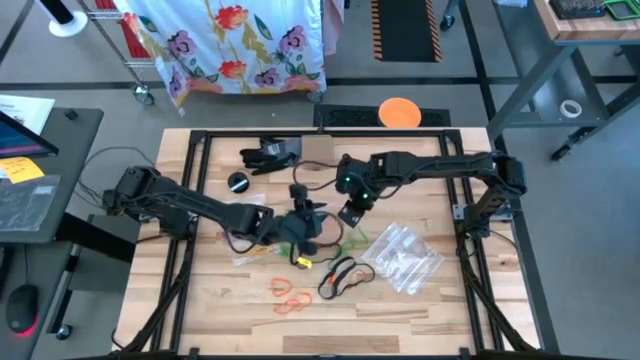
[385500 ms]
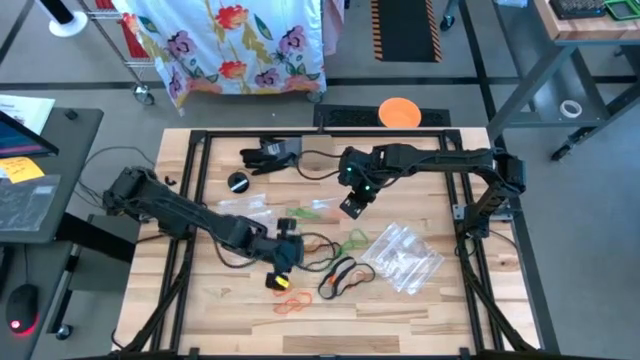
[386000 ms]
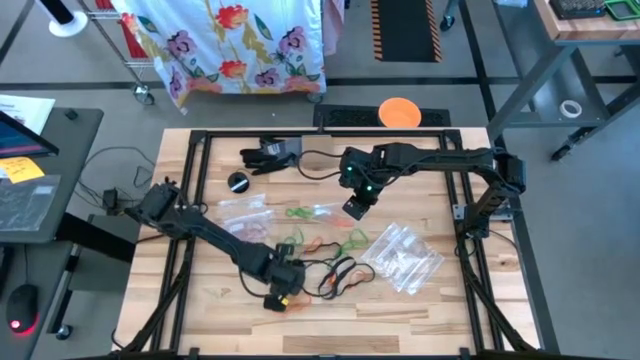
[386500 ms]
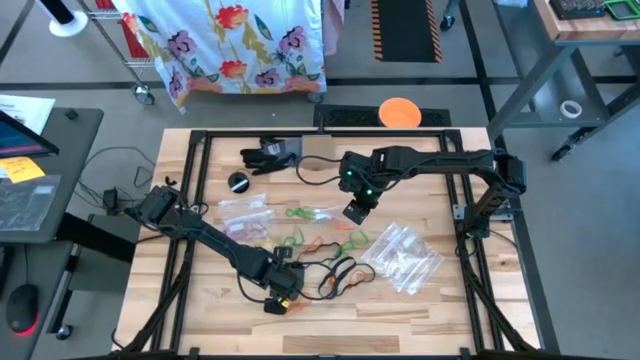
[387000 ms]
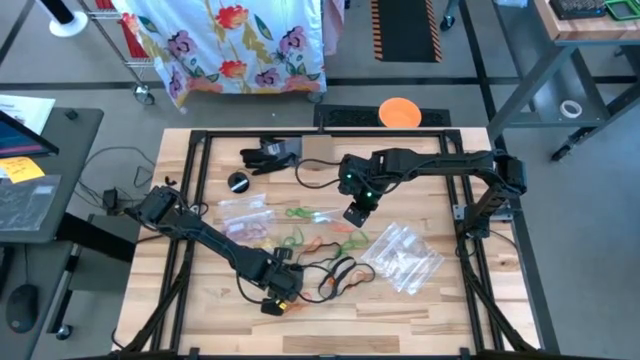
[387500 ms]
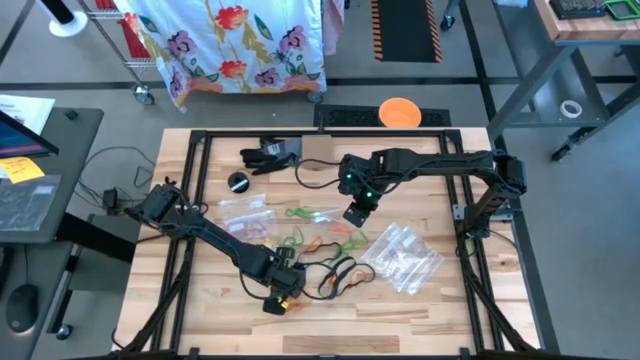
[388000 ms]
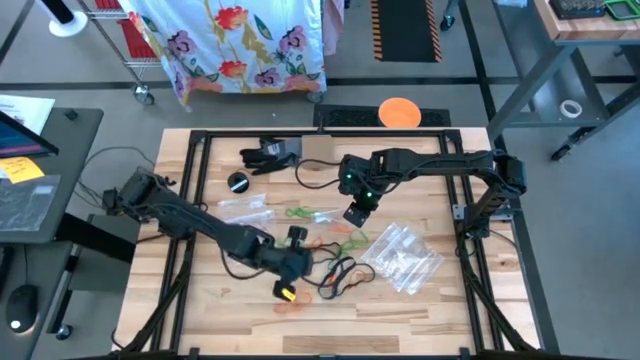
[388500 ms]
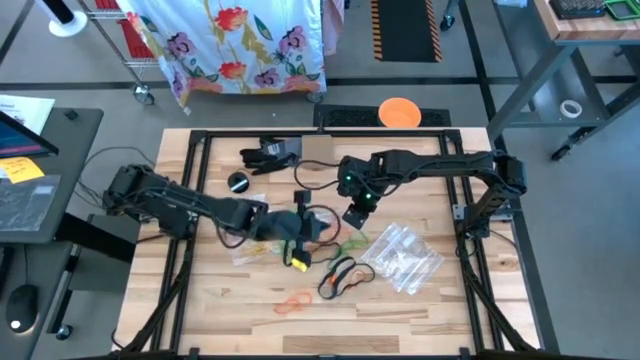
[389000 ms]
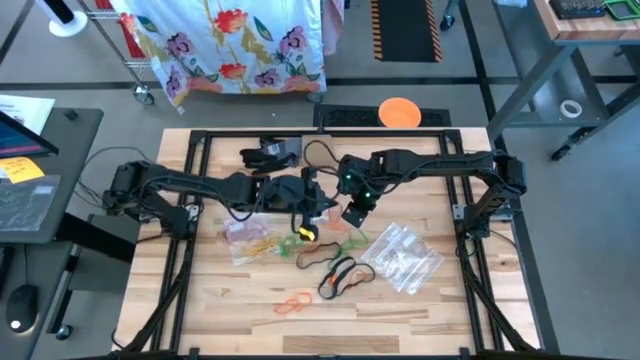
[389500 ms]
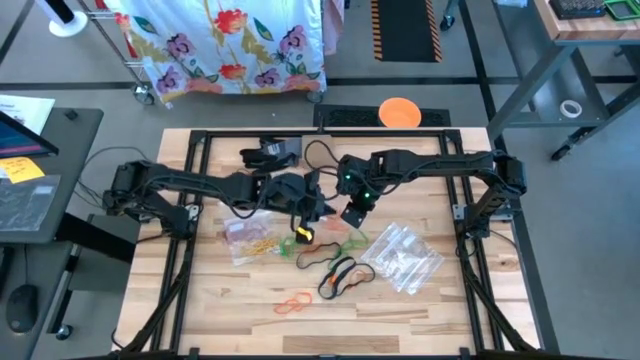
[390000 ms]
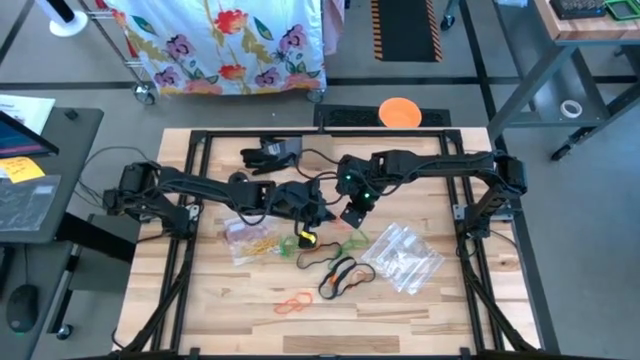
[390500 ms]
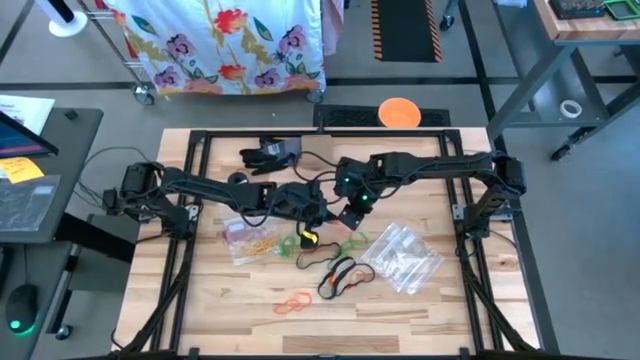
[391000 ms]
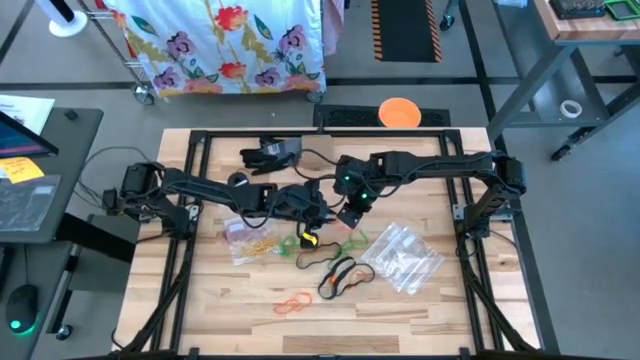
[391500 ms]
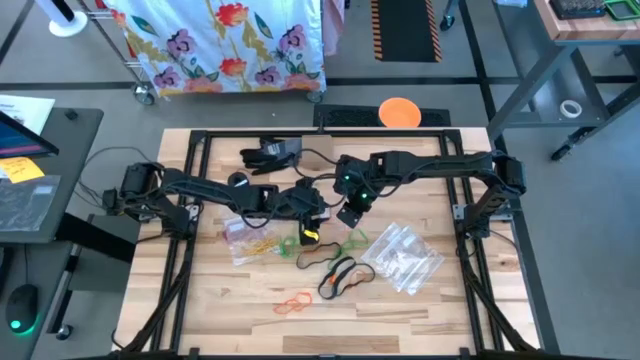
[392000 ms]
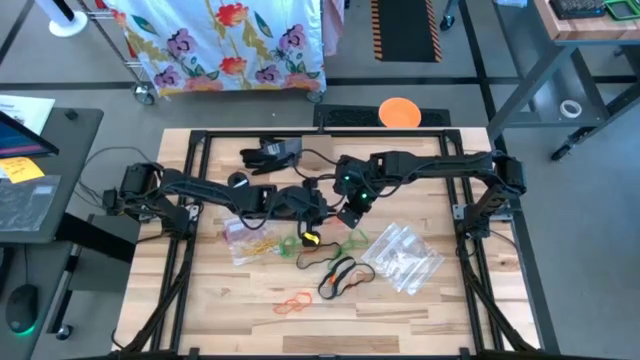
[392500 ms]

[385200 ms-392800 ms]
Task: Sort rubber bands
Put the orange rubber band into the transparent zip bag

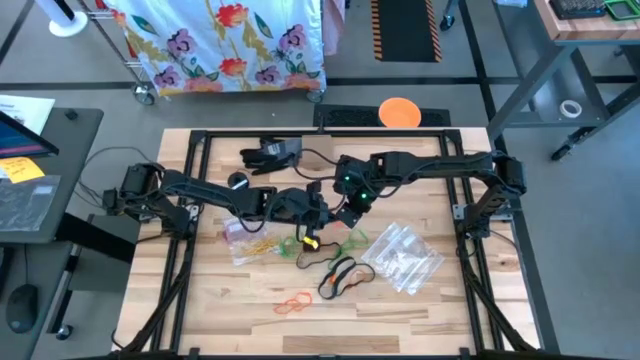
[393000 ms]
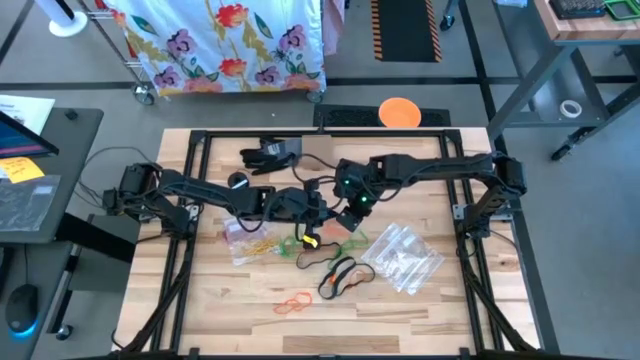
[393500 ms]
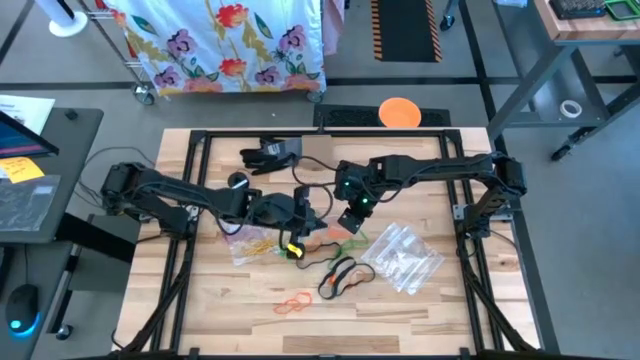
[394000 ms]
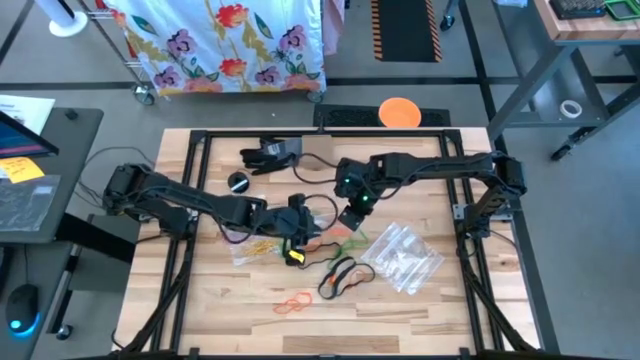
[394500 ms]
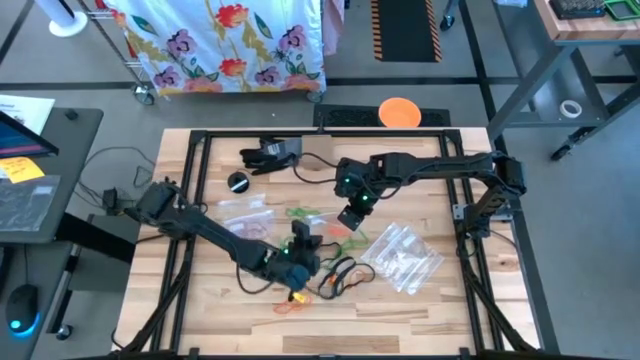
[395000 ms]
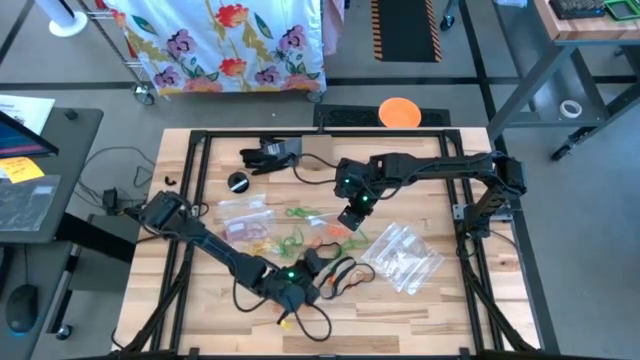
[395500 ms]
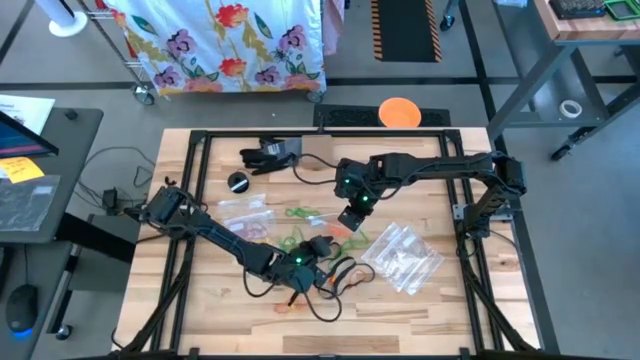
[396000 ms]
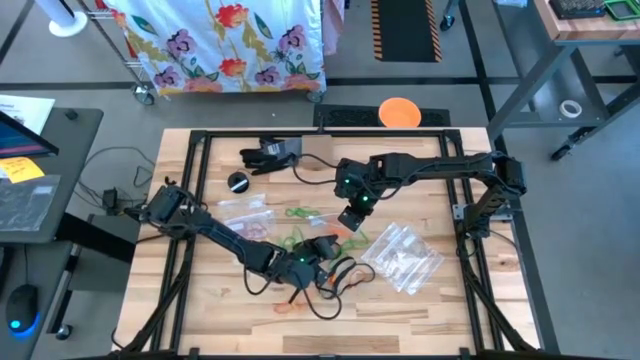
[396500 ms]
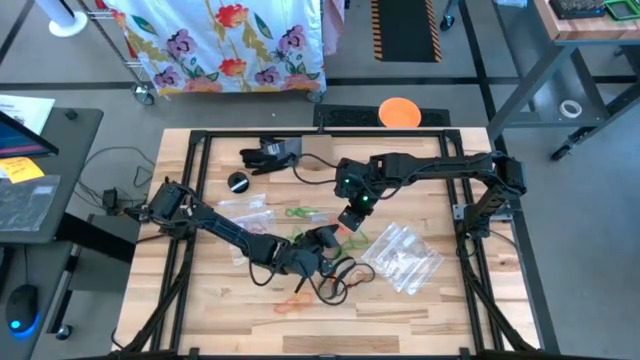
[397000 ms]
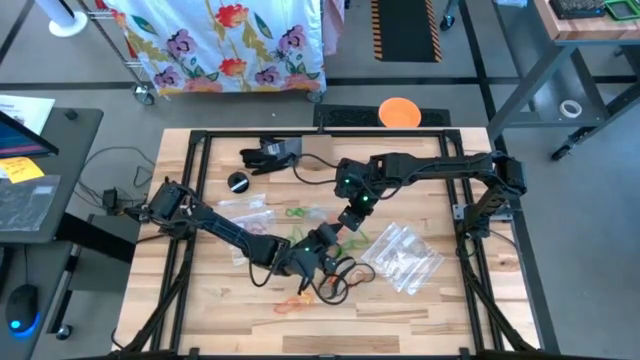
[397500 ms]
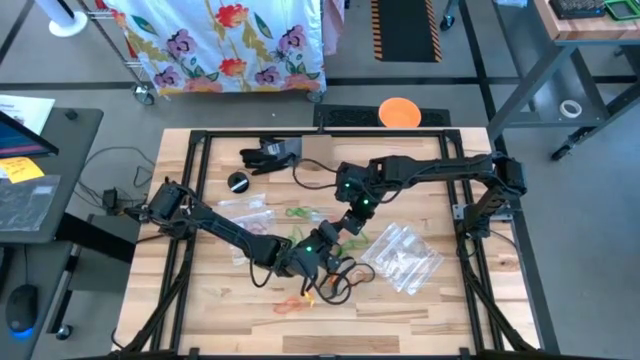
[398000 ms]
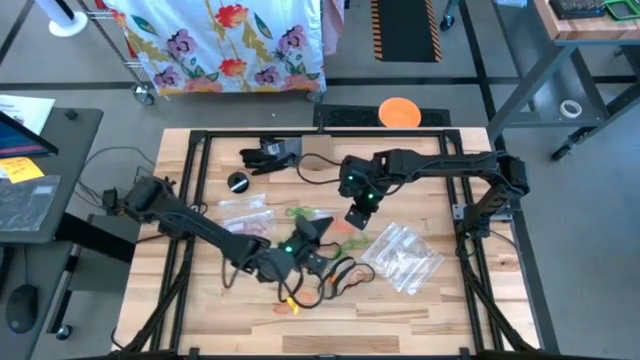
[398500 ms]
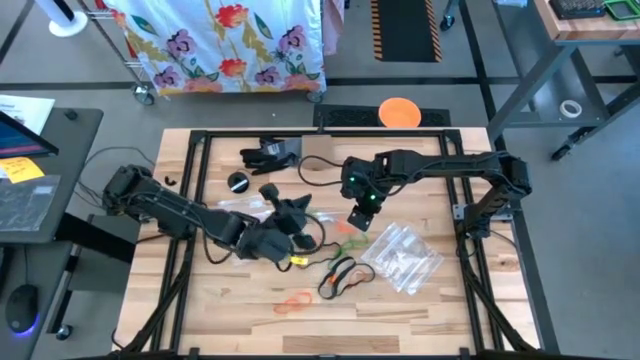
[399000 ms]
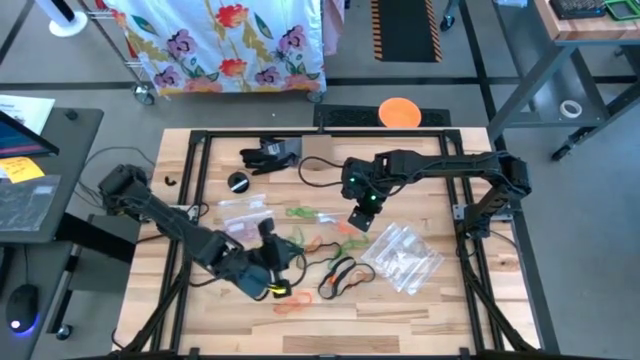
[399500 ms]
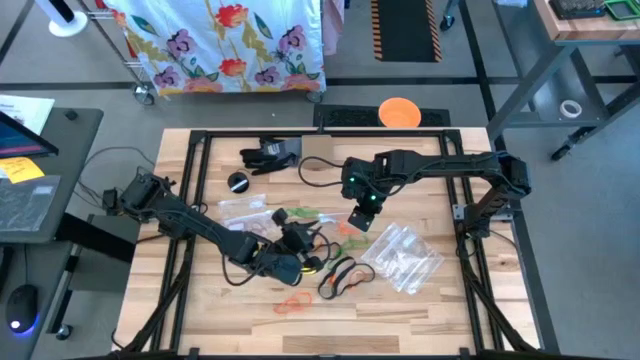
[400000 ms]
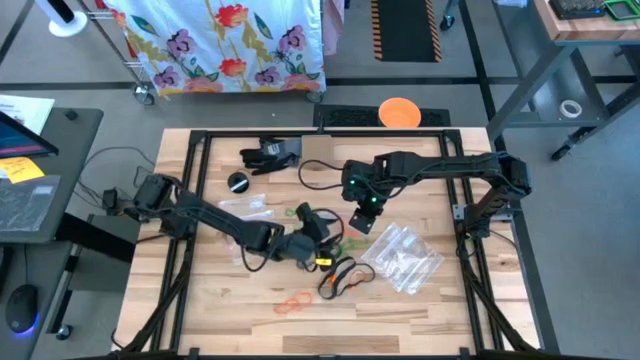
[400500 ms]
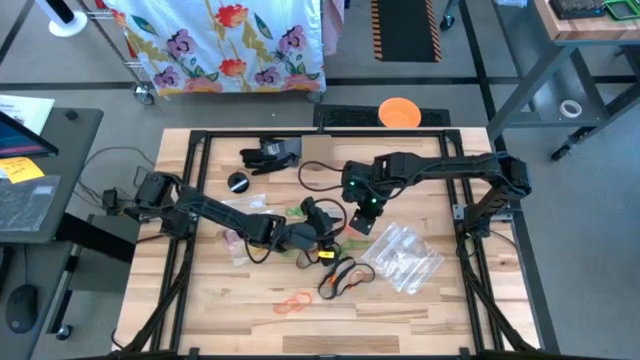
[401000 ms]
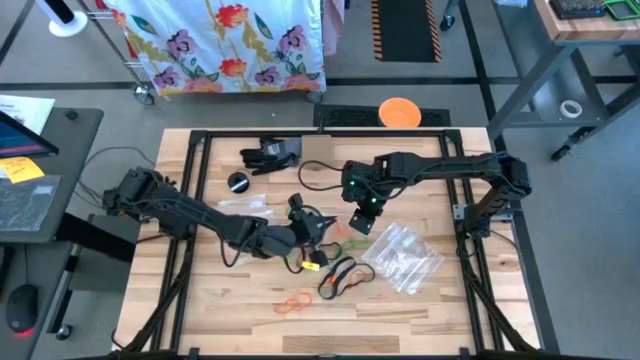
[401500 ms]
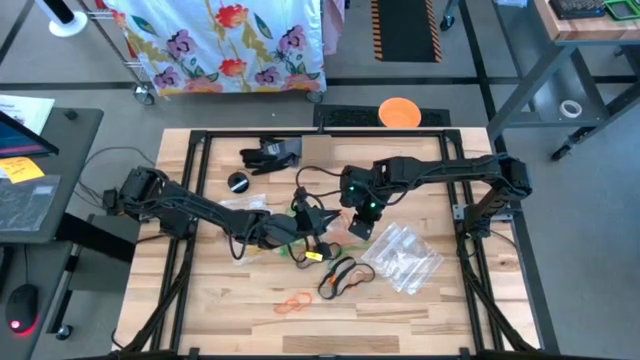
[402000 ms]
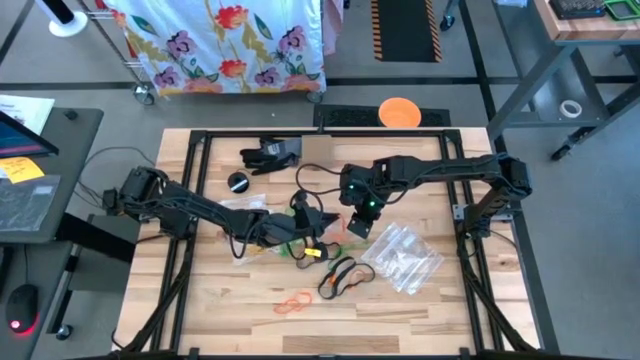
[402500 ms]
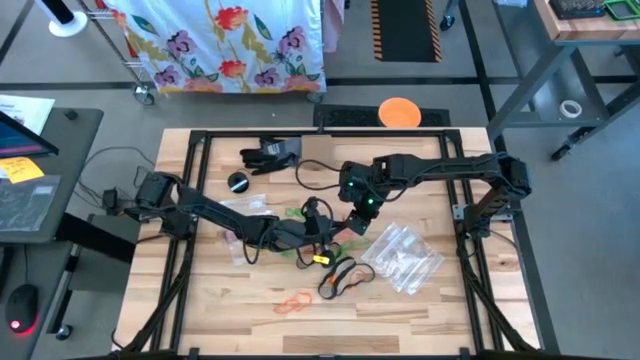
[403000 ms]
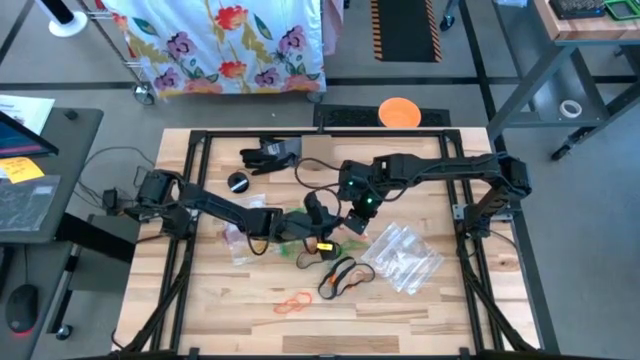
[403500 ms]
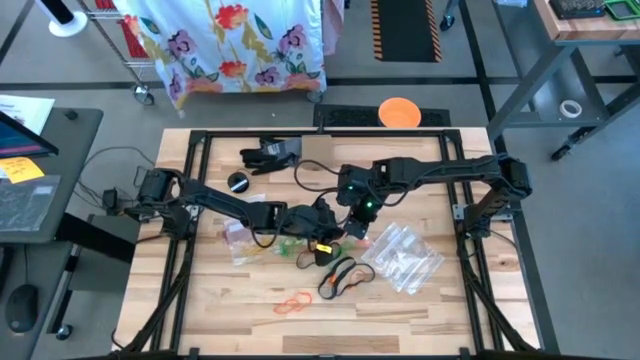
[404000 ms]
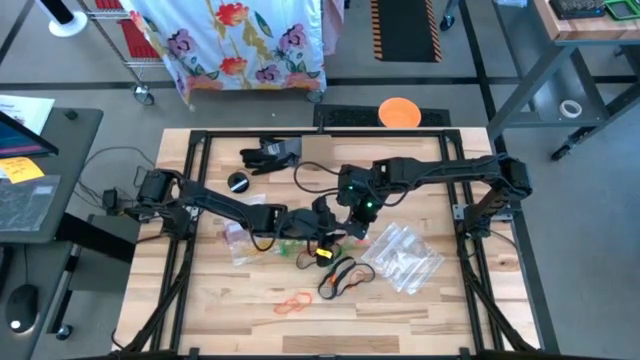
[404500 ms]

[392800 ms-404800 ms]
Put the orange rubber band into the transparent zip bag

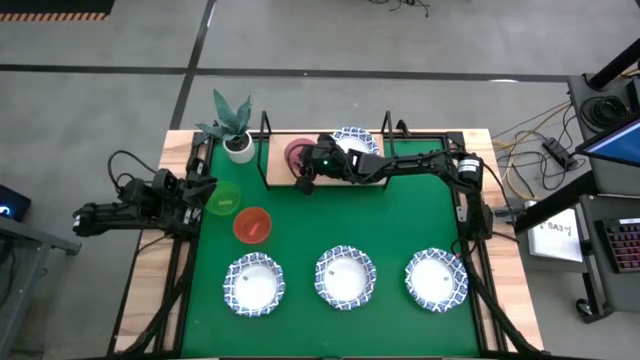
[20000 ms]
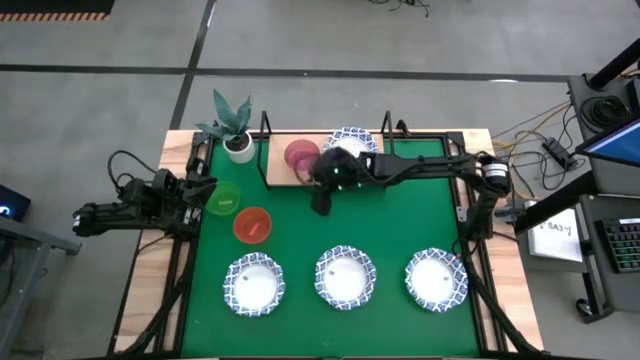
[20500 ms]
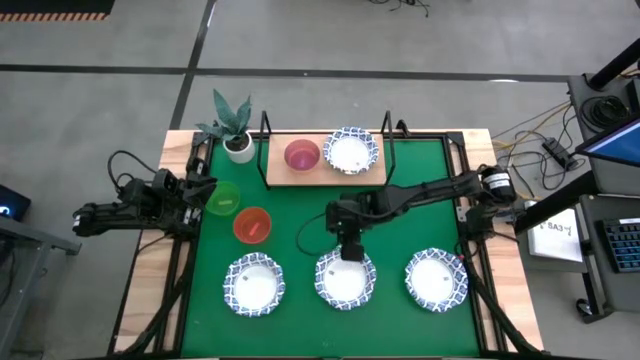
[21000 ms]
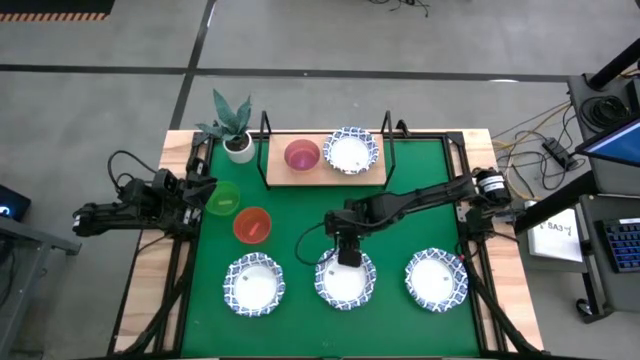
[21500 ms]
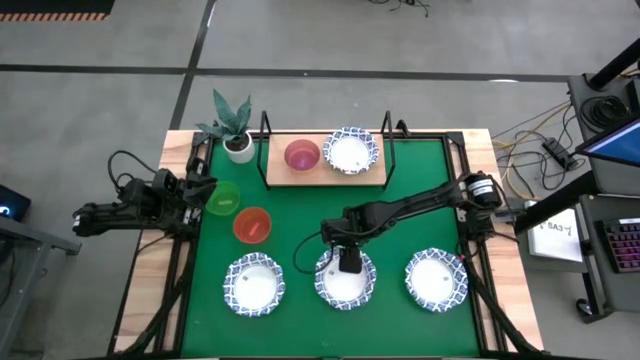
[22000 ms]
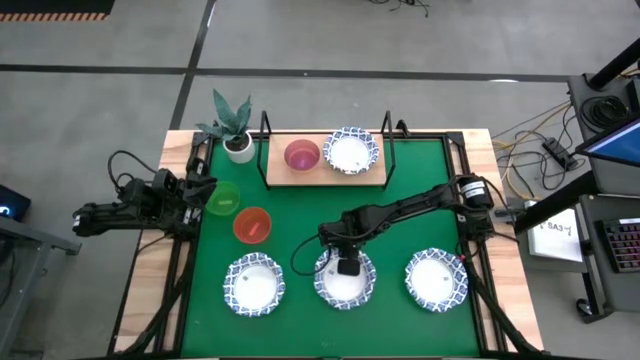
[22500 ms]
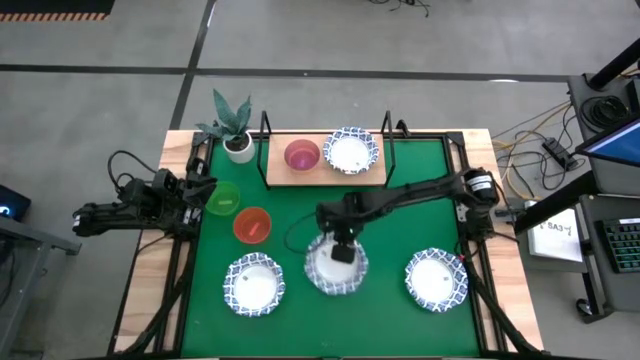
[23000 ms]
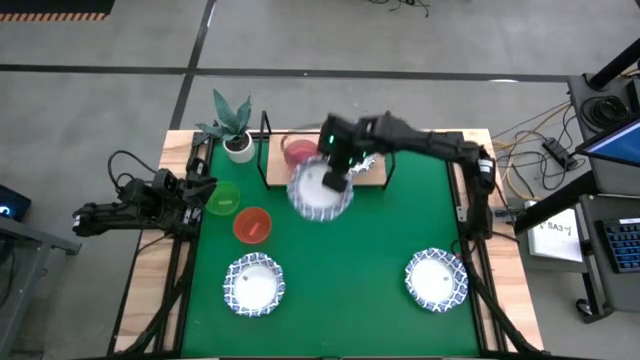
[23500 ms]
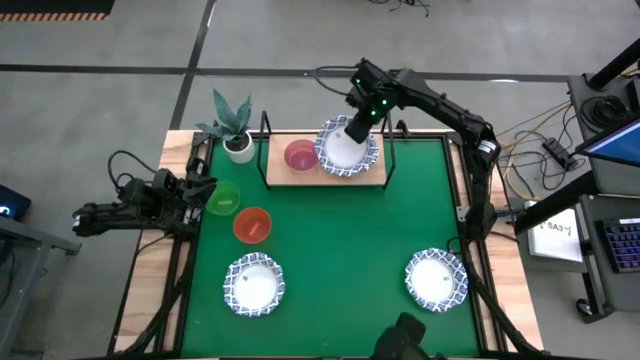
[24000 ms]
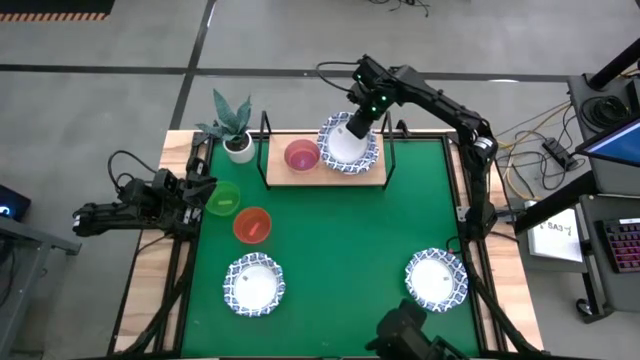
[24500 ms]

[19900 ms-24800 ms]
Task: Place and stack bowls onto a shelf
Stack the blue patterned bowl on top of the other blue patterned bowl on the shelf
